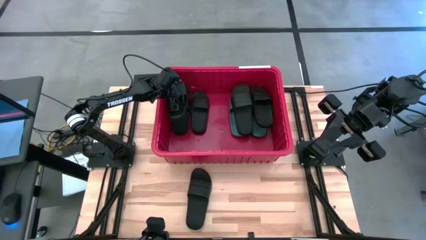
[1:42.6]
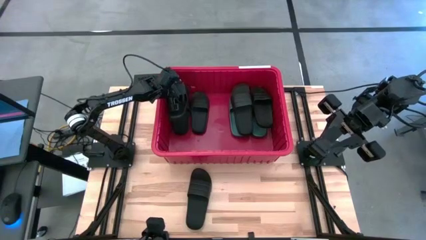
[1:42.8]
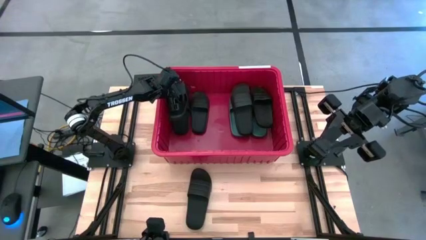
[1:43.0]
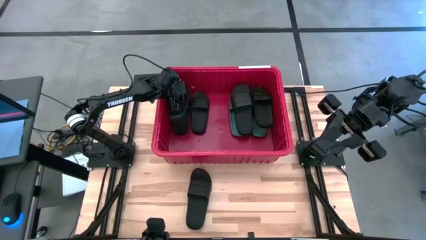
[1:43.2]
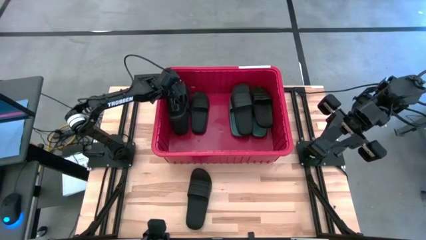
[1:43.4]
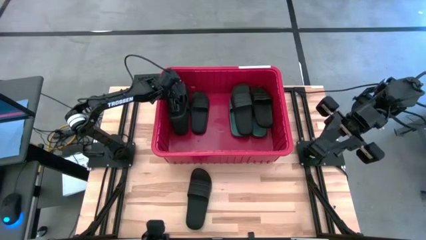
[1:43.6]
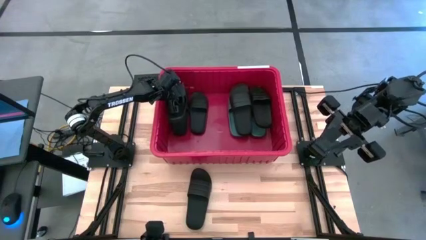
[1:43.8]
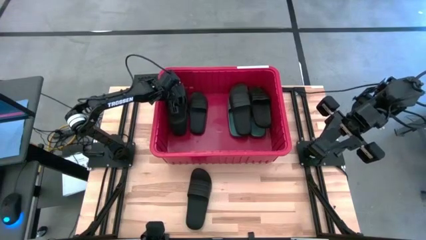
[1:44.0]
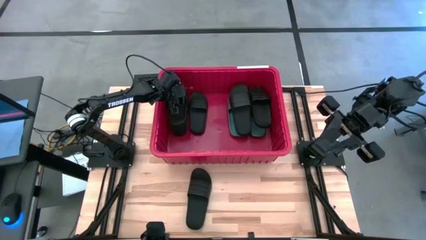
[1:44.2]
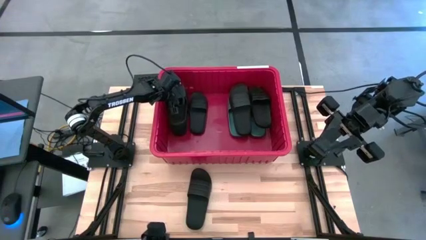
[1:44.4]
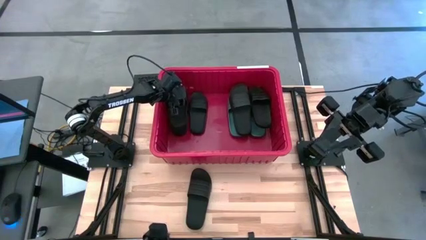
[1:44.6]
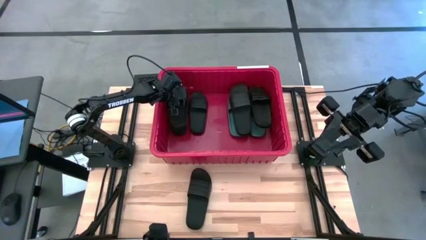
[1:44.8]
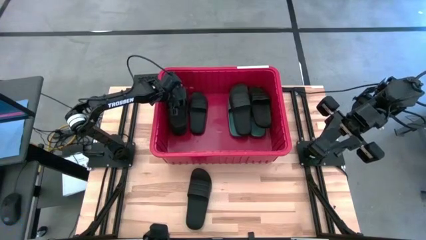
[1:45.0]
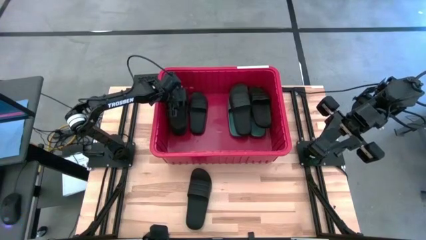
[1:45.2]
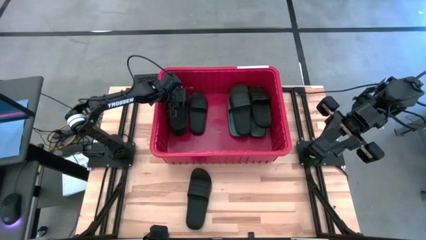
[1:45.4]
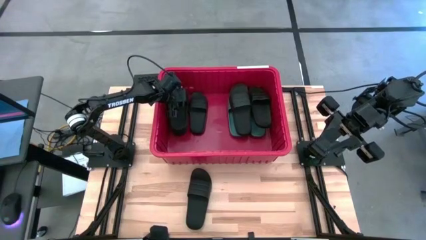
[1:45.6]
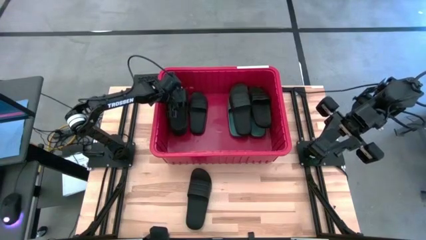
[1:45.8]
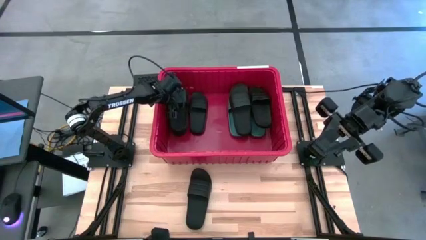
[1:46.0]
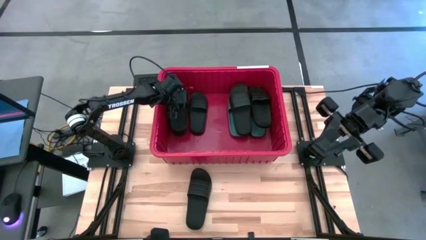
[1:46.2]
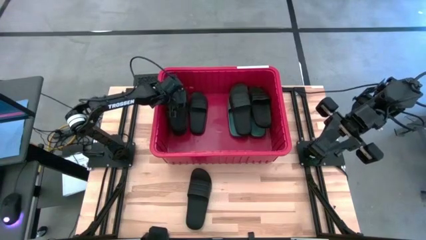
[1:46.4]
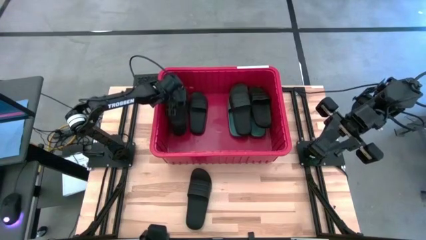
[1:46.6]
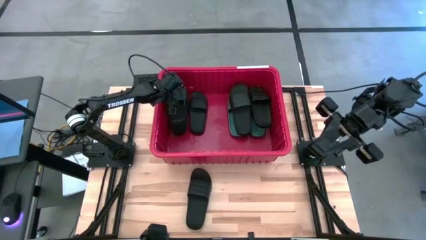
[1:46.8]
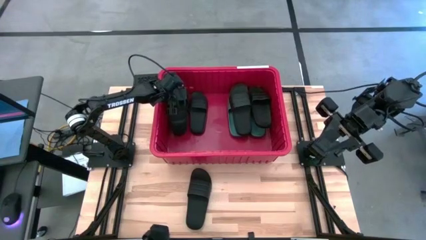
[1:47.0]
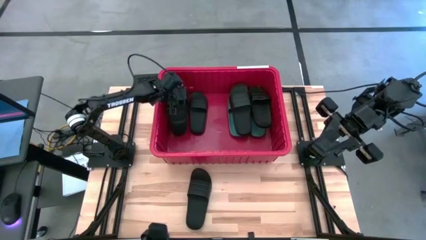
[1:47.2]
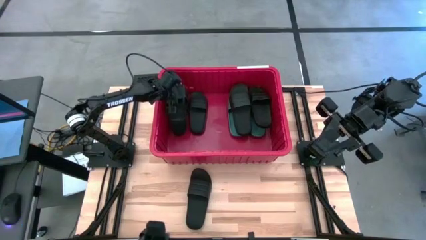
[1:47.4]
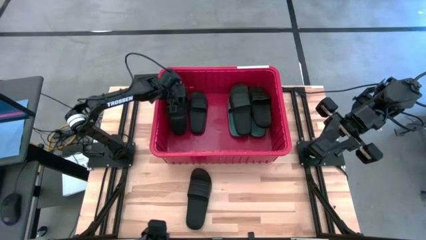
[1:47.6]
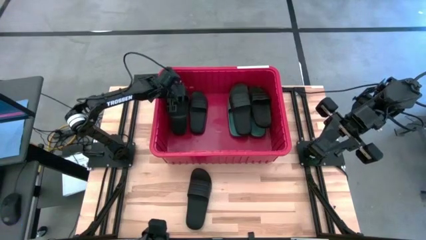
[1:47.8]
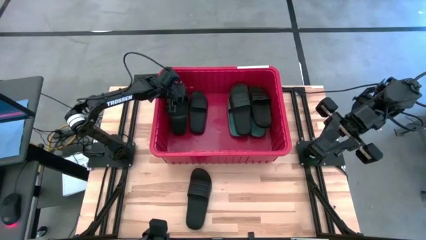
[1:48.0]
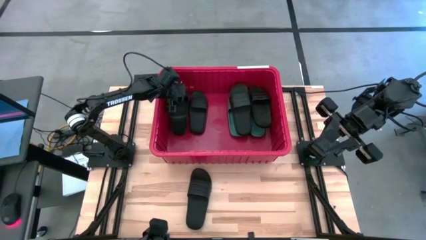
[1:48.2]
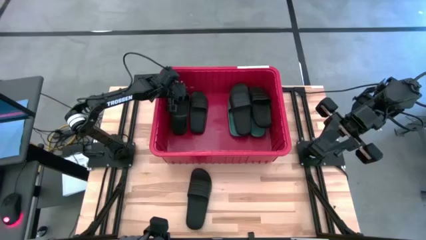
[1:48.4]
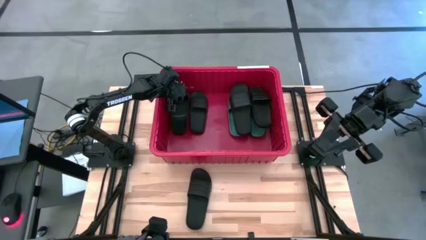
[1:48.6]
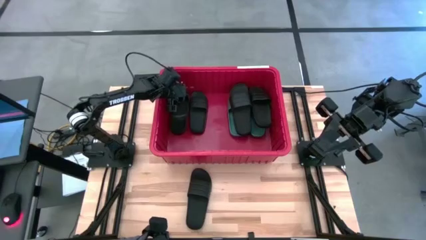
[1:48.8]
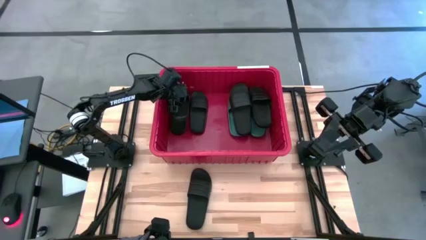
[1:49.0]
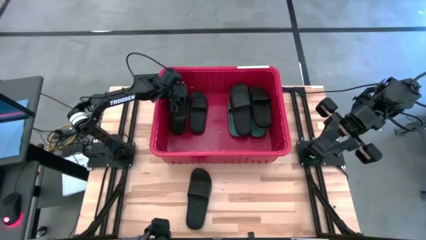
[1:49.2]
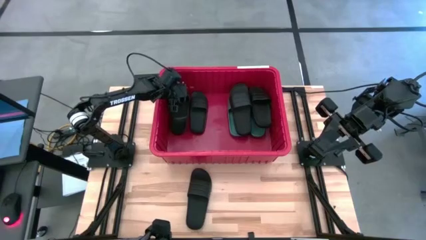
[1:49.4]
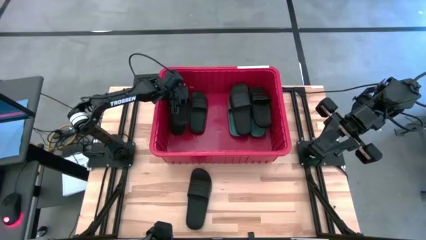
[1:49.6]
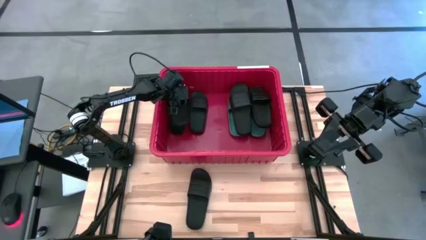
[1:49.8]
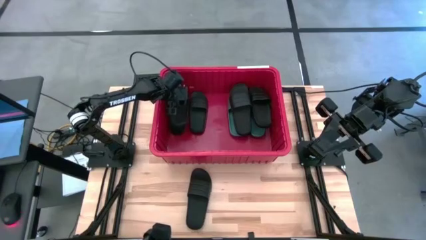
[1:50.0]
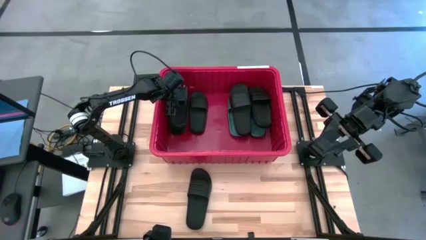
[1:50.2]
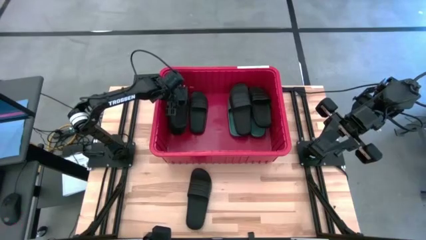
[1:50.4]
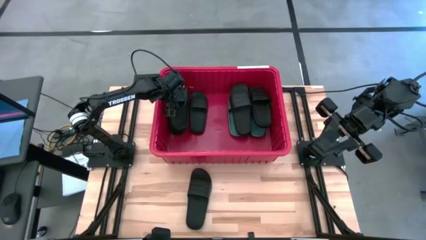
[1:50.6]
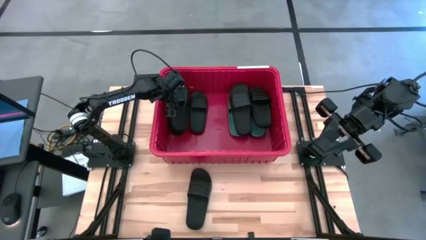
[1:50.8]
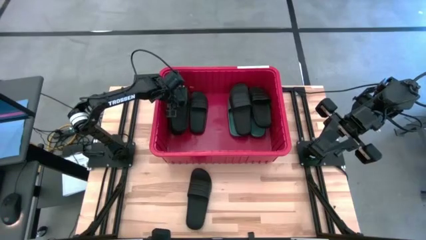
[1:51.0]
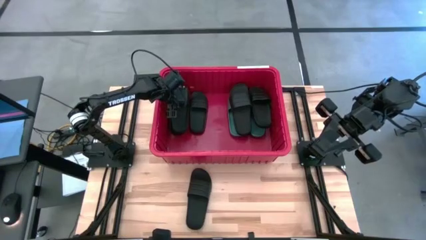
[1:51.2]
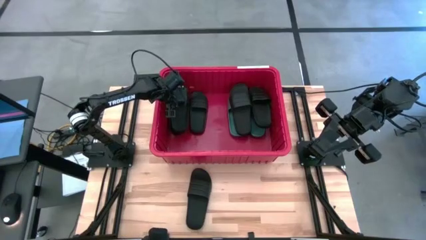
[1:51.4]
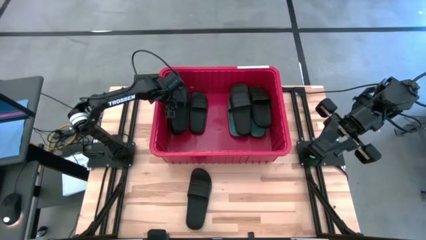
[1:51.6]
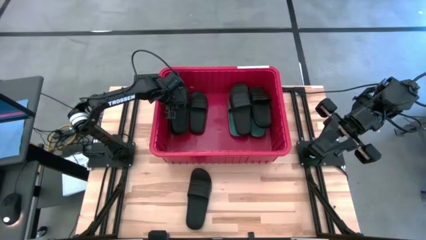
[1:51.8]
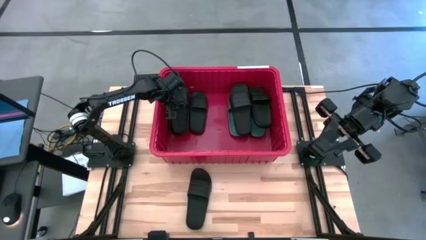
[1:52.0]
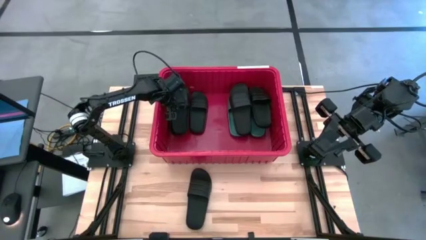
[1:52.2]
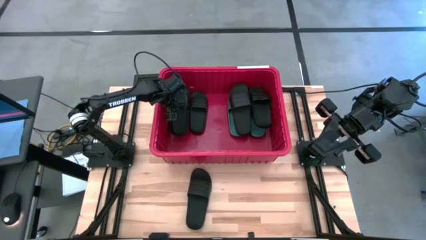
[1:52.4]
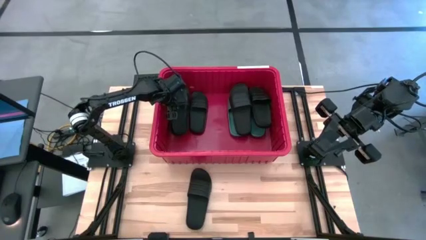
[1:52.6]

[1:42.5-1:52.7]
Task: Pick and place slides into bin
Put the left black slipper into the red organizer bin

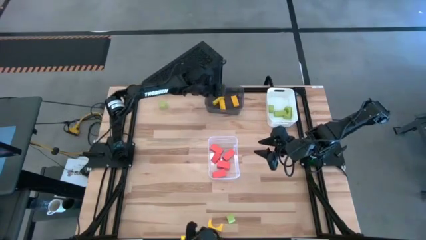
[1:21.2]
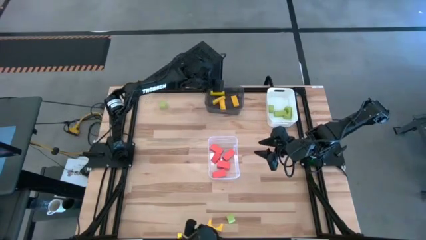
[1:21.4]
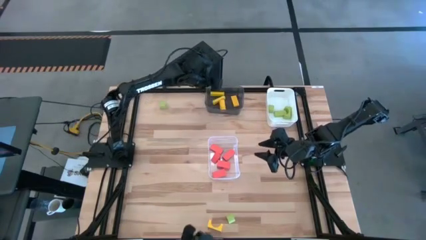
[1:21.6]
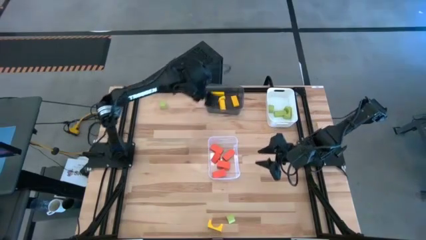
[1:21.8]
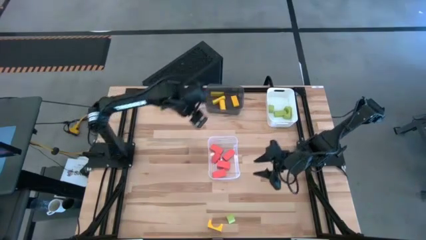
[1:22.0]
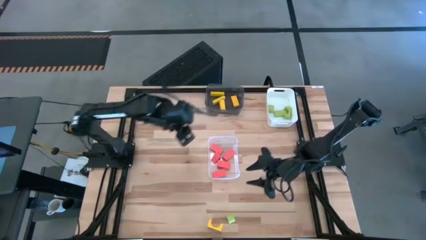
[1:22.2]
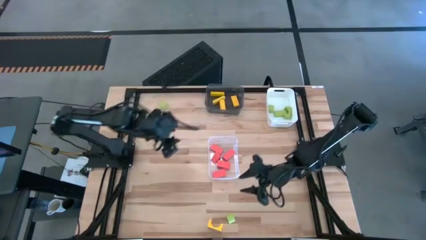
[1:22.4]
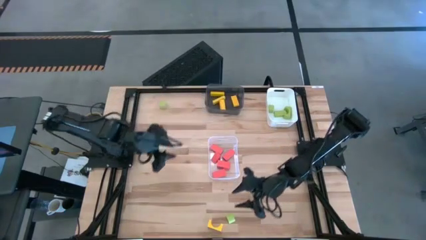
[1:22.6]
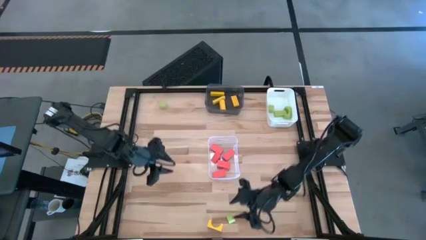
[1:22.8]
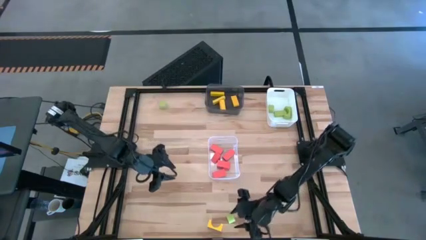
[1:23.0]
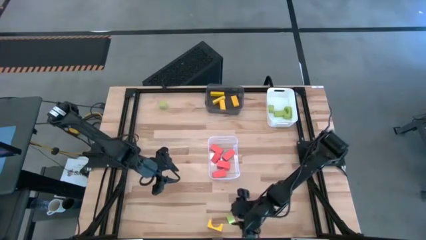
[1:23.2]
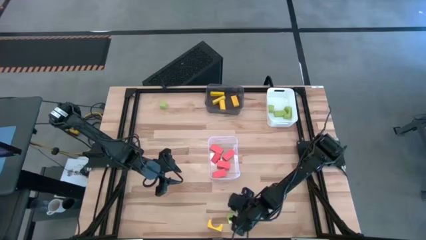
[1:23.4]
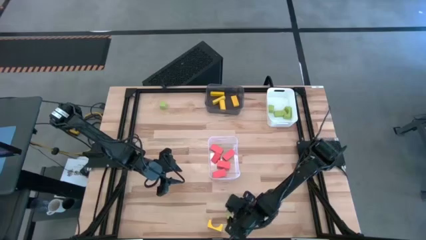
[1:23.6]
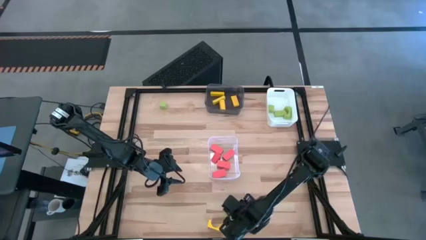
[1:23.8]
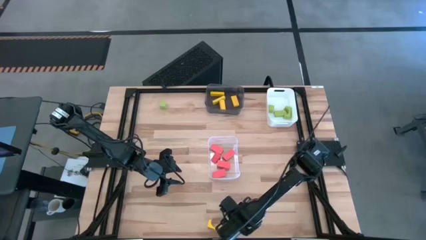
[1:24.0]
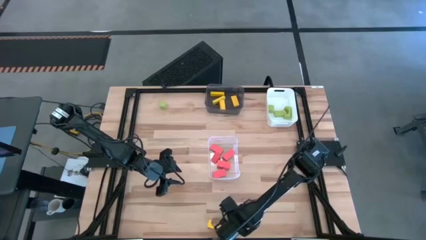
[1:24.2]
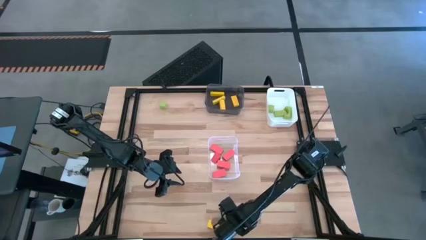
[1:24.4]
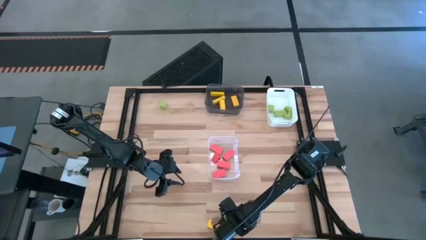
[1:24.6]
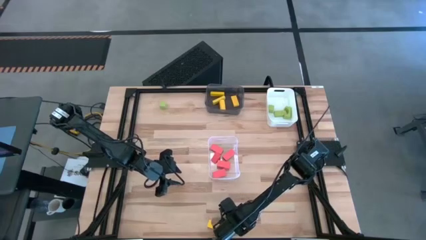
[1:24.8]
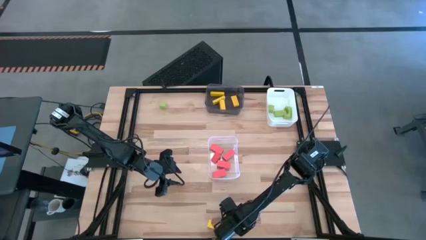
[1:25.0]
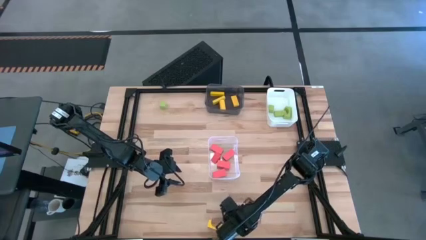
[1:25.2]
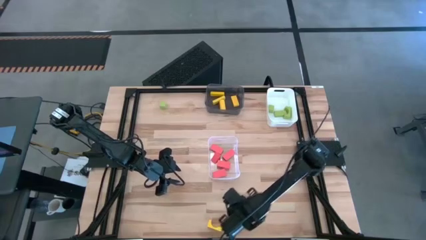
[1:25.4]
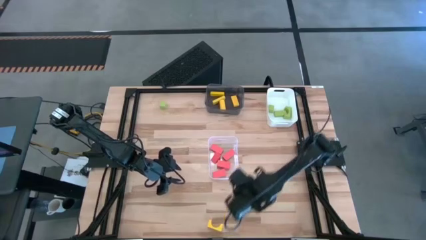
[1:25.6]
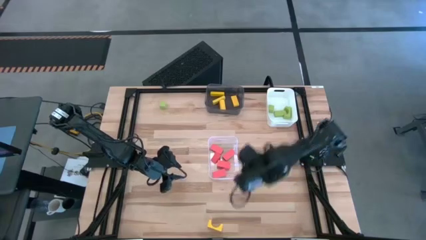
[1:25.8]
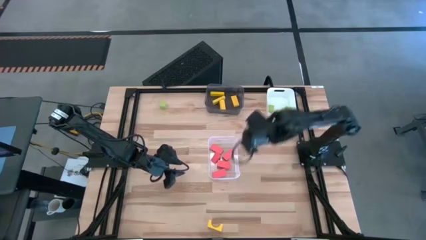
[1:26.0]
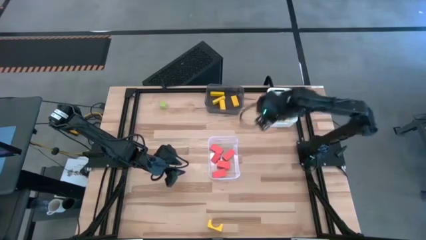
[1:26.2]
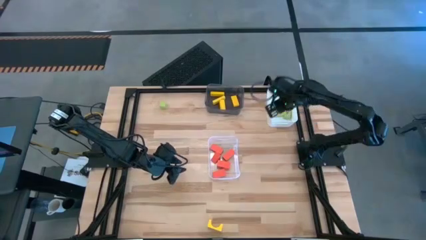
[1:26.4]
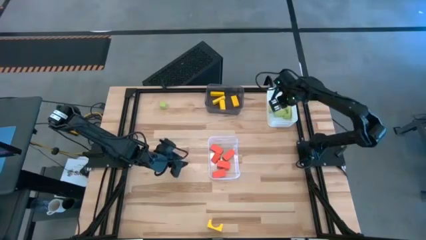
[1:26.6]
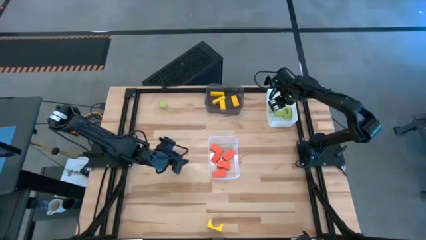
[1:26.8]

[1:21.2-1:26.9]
Task: Sort & place blocks by color
Put the green block into the white bin

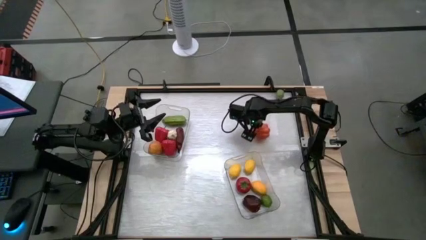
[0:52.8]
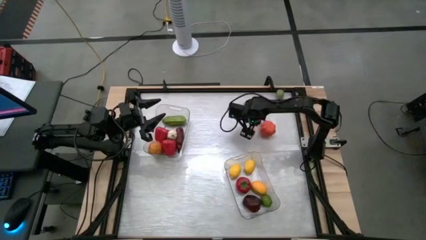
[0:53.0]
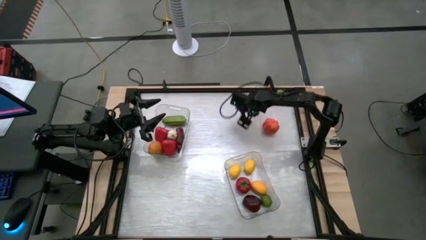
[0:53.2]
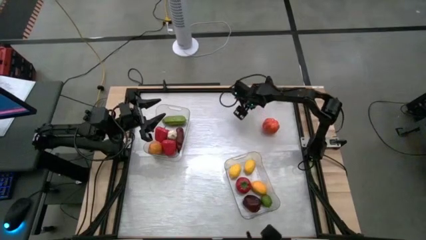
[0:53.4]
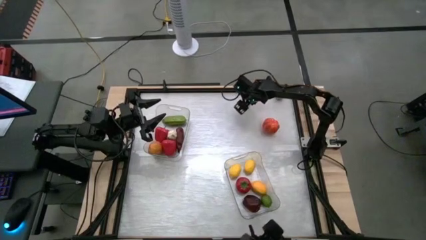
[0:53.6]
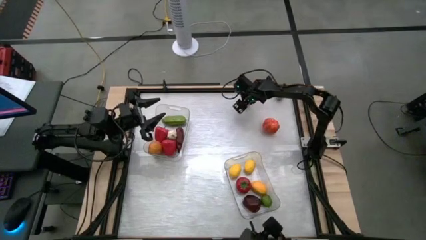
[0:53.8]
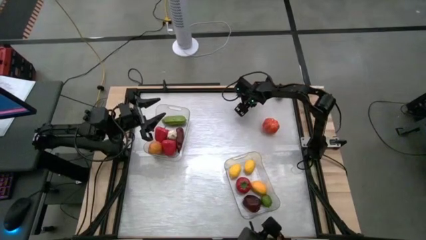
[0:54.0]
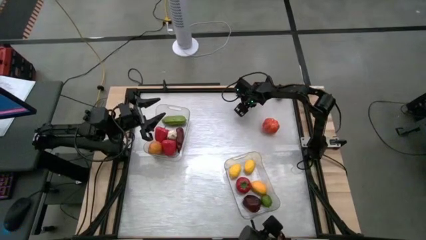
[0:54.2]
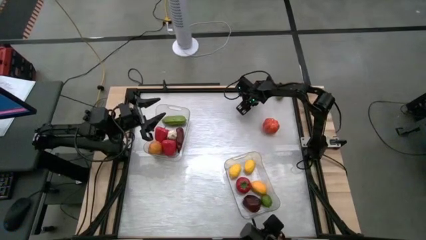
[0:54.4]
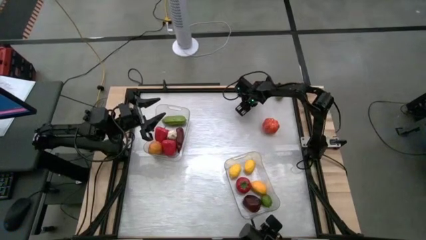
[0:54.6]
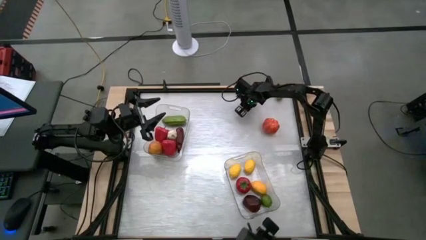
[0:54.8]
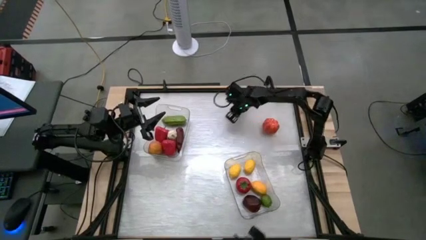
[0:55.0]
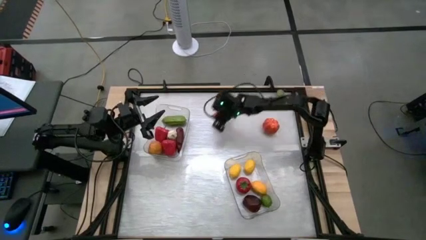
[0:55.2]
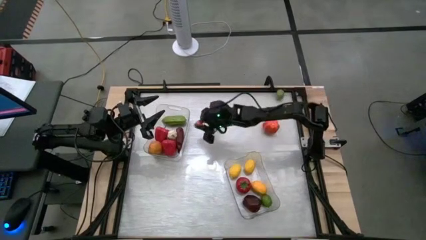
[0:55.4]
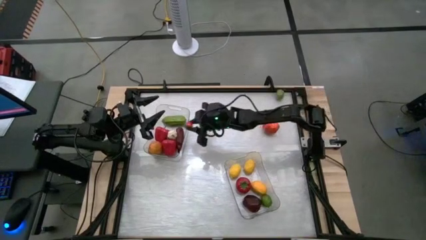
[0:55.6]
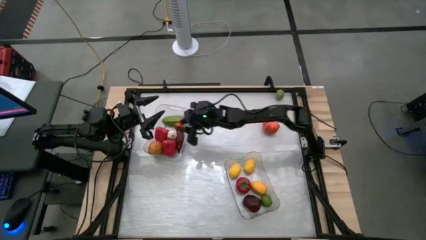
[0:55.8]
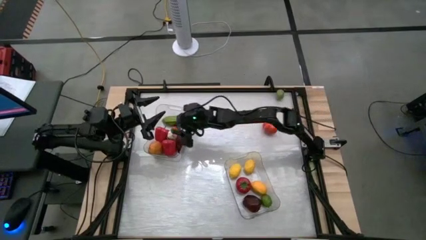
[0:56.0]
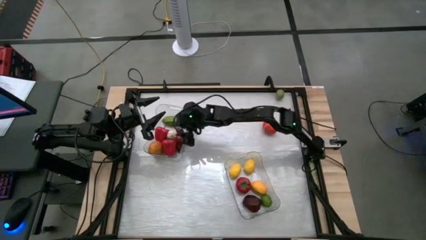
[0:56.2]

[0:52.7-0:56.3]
Task: Sort produce into baskets
Put the red tomato into the left transparent bin
